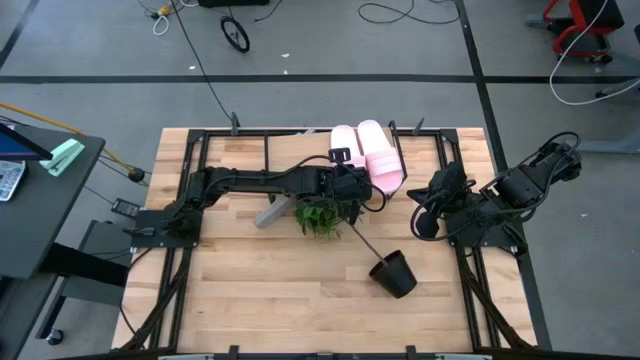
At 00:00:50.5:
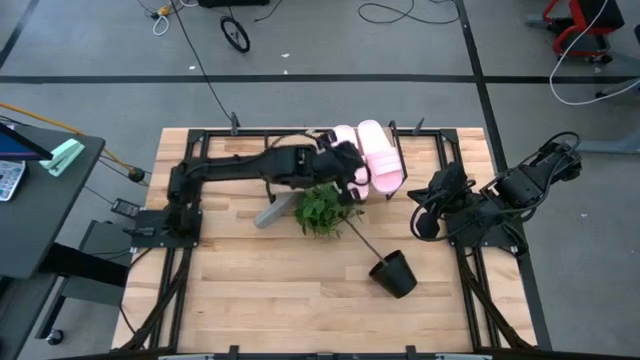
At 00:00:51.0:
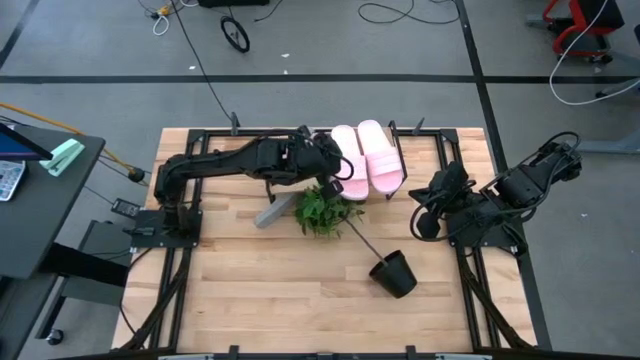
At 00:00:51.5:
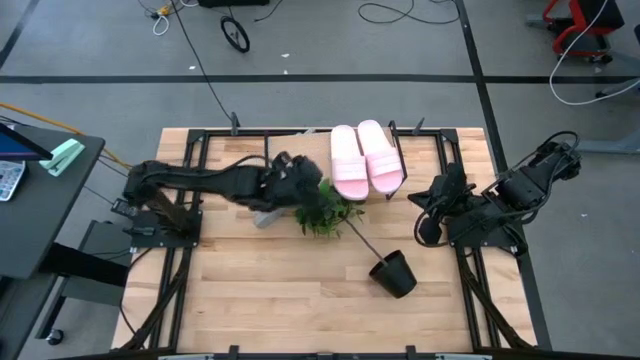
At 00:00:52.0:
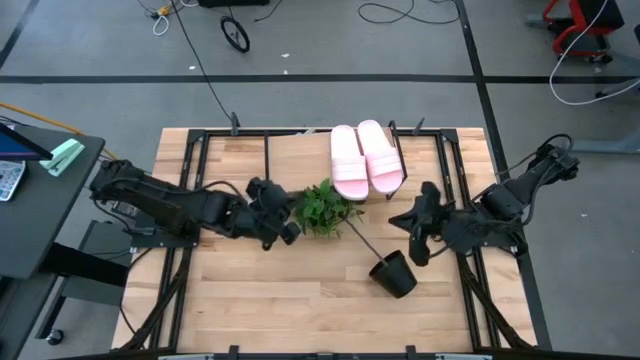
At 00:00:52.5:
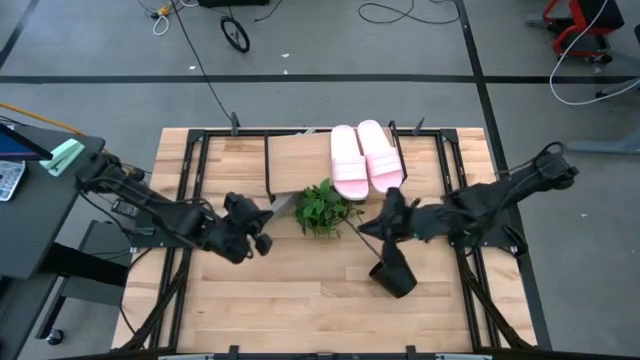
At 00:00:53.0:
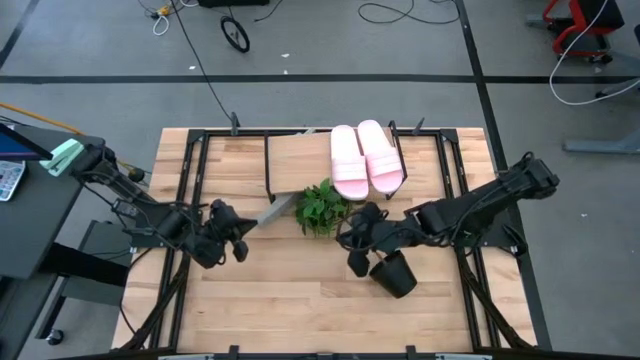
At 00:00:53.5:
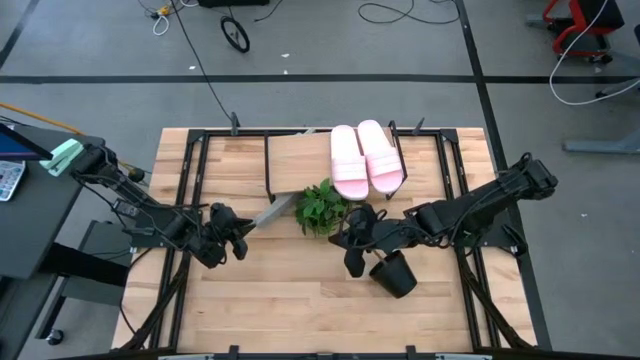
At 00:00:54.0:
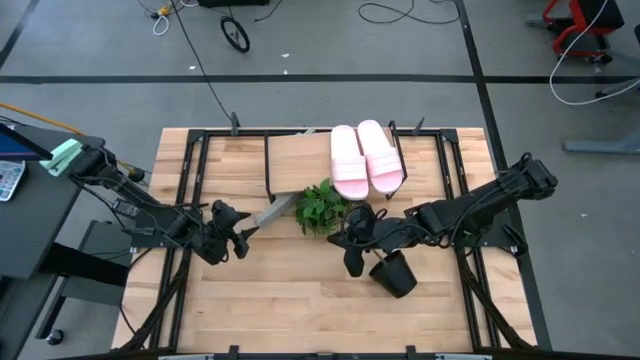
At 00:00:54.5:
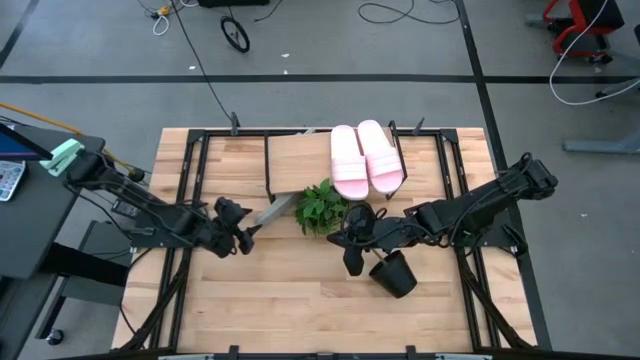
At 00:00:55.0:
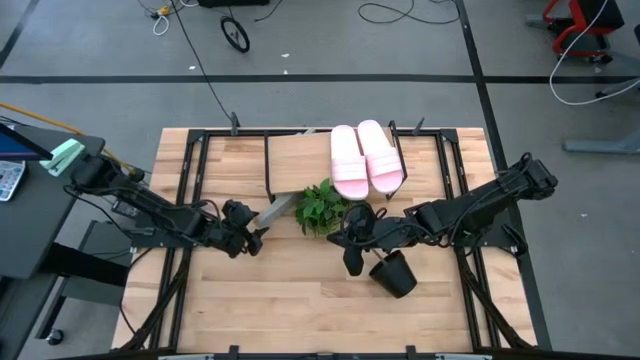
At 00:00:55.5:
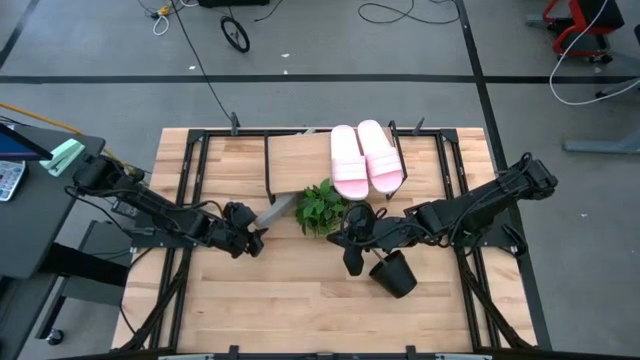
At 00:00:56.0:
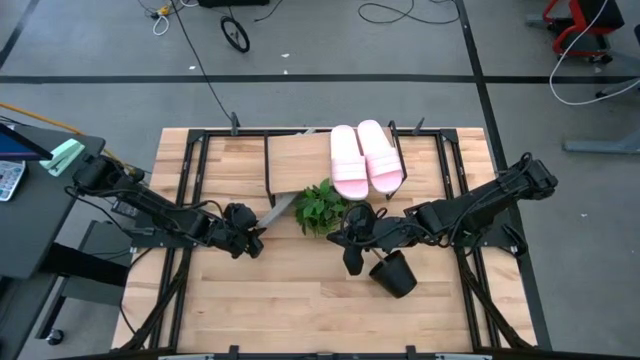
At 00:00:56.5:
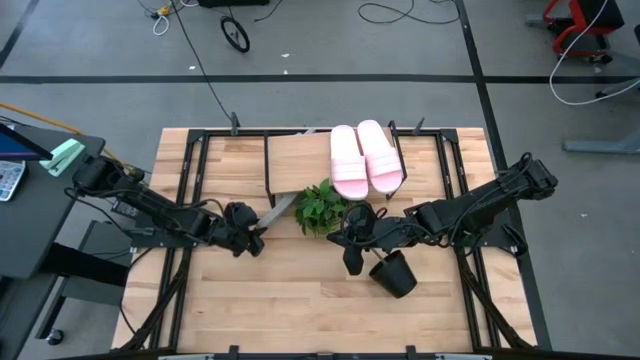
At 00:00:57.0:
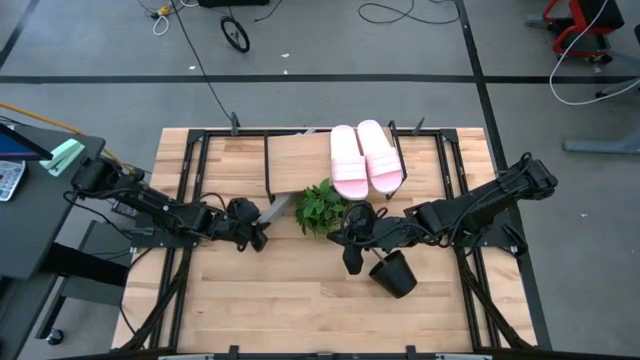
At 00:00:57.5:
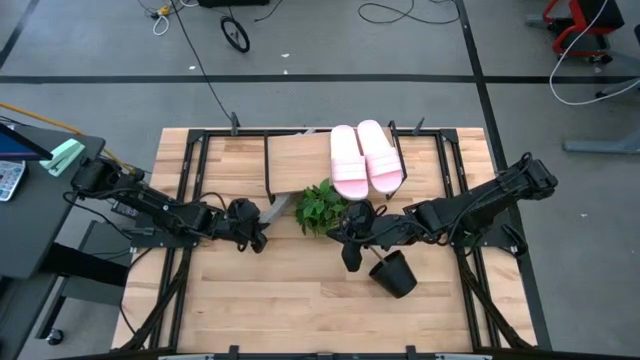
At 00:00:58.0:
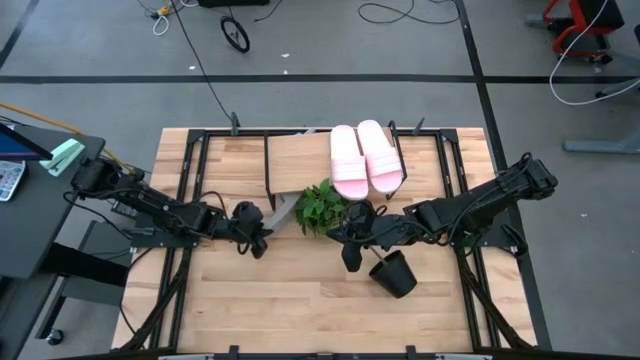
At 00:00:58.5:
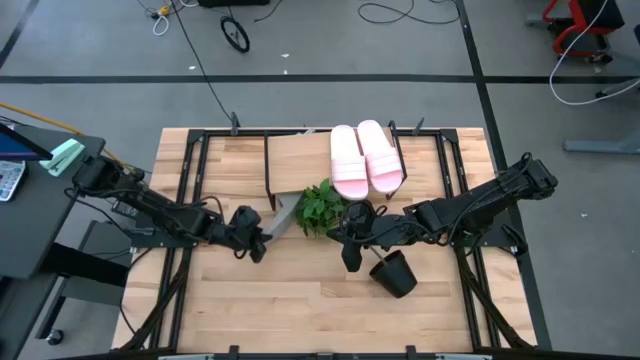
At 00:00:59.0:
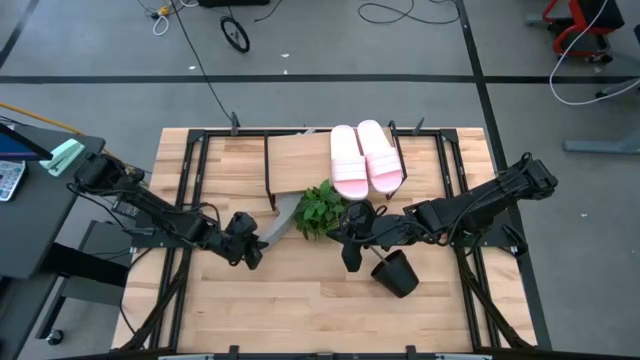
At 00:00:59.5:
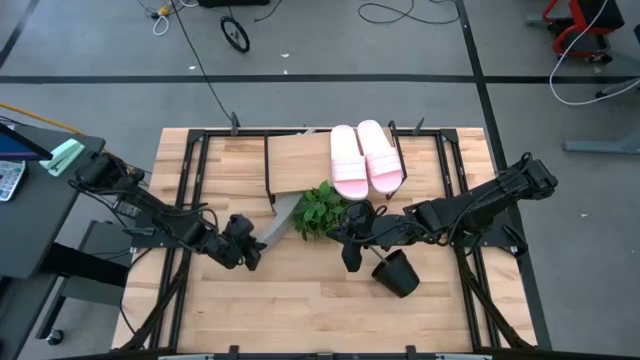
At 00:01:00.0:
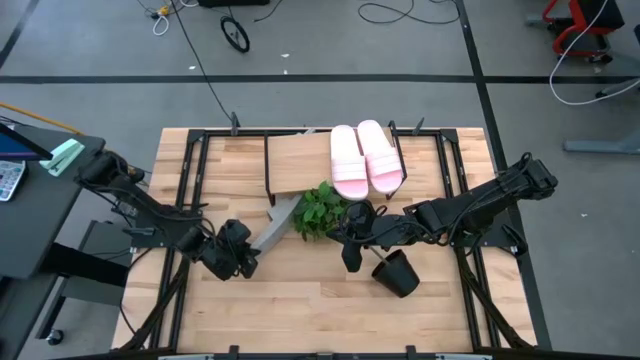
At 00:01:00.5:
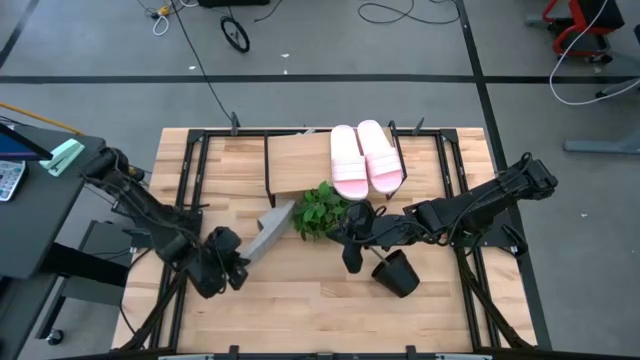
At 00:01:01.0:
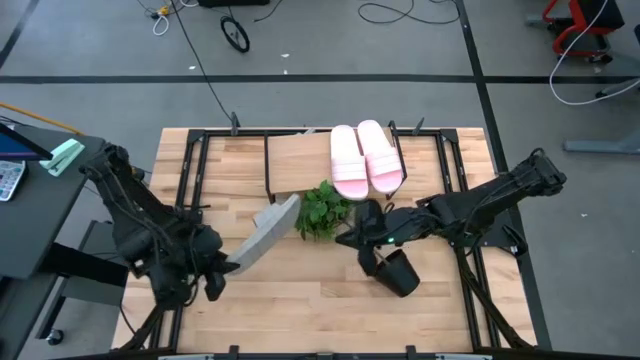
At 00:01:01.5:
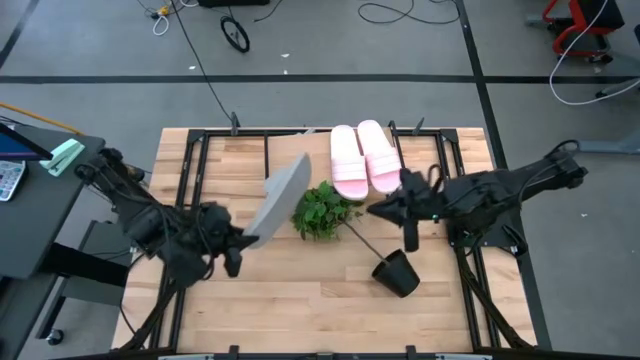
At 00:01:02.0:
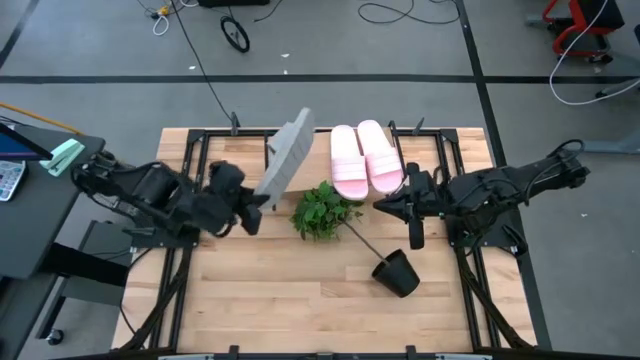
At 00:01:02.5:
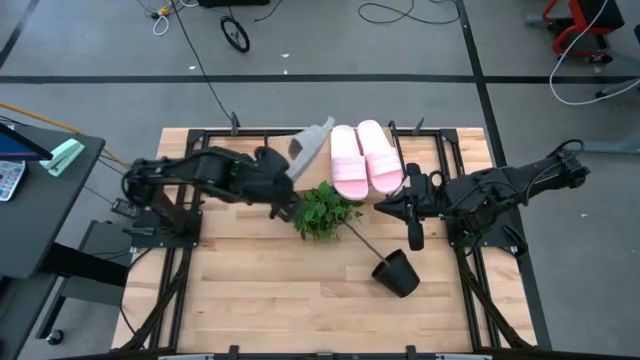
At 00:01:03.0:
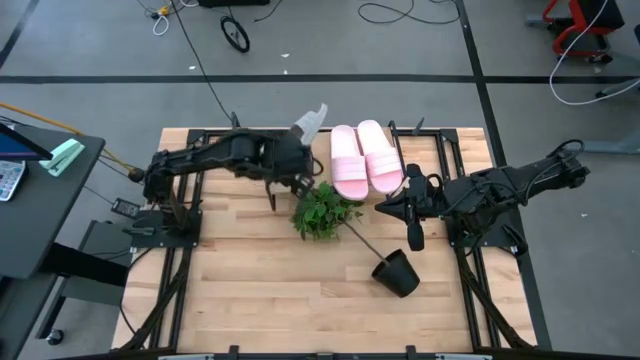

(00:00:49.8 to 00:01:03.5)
Task: Pick and place slides into the shelf
Put the bottom gray slides on the shelf

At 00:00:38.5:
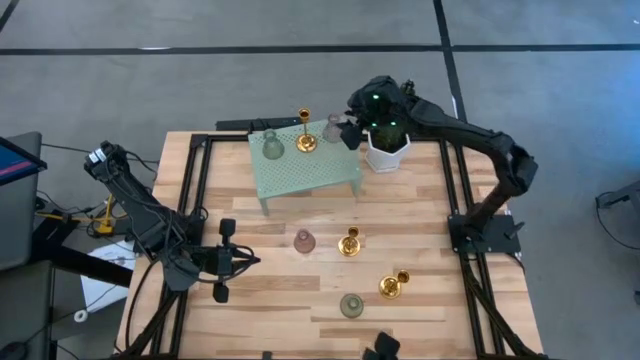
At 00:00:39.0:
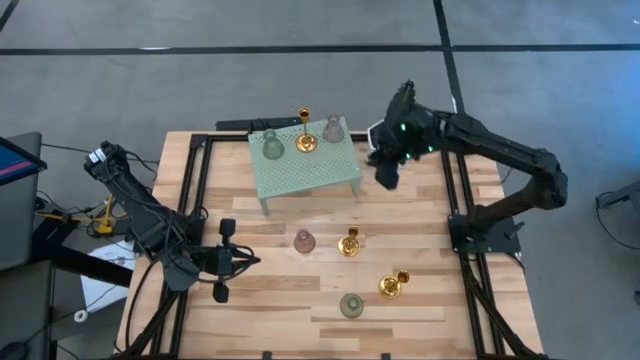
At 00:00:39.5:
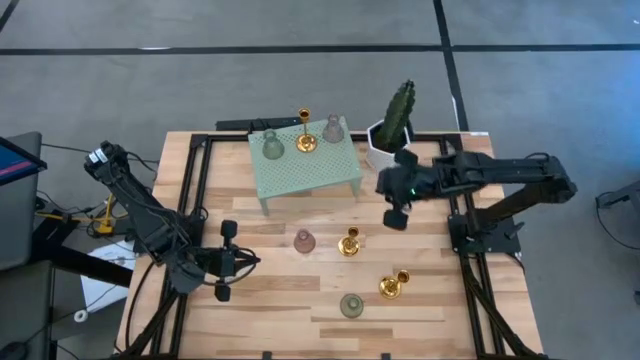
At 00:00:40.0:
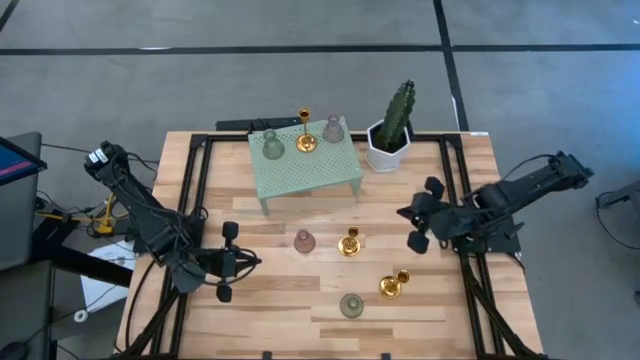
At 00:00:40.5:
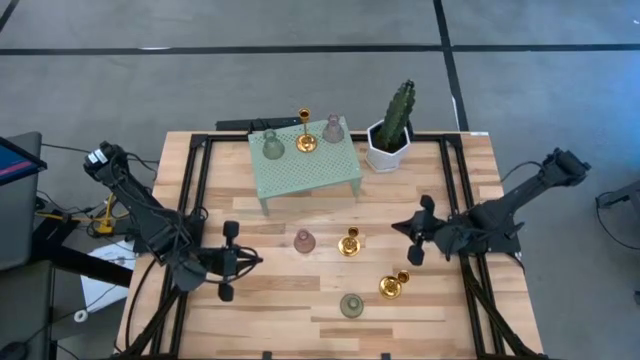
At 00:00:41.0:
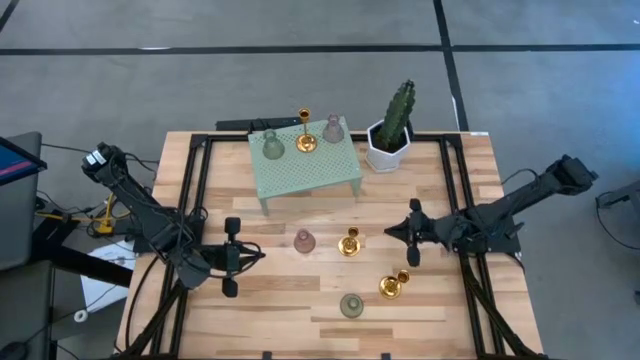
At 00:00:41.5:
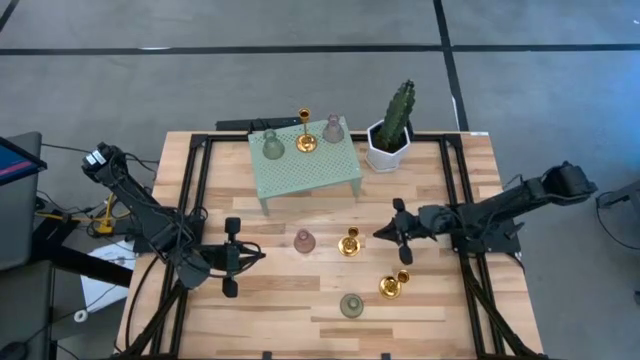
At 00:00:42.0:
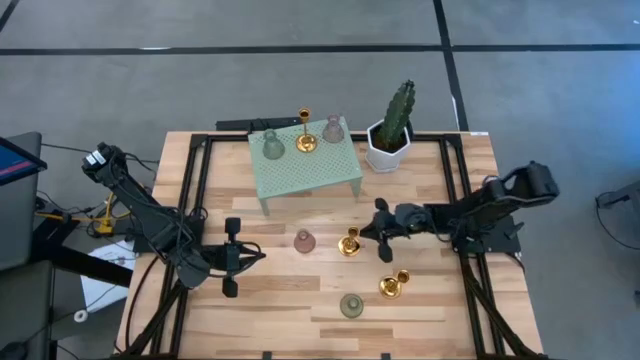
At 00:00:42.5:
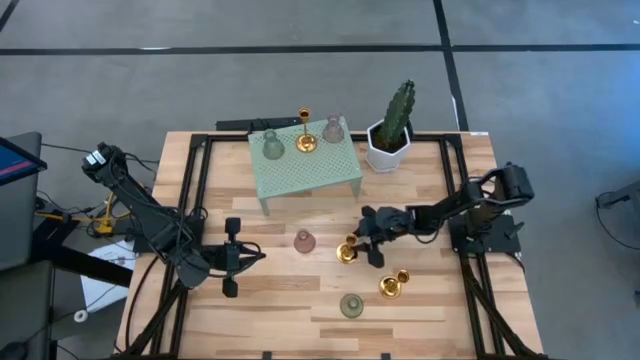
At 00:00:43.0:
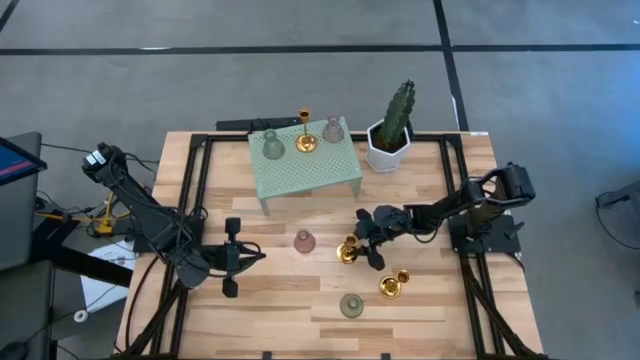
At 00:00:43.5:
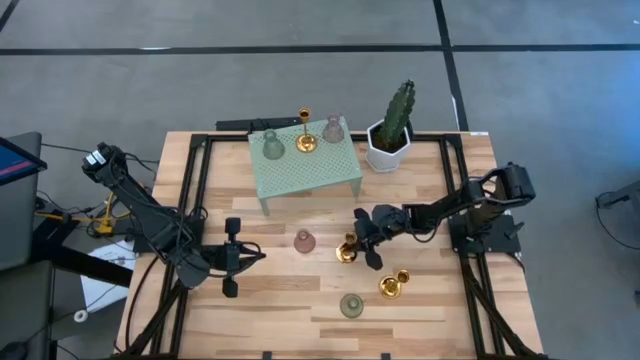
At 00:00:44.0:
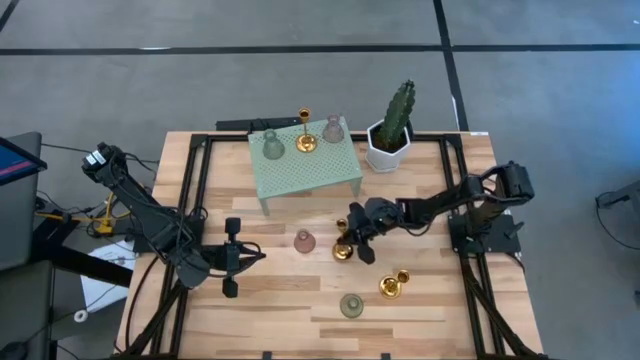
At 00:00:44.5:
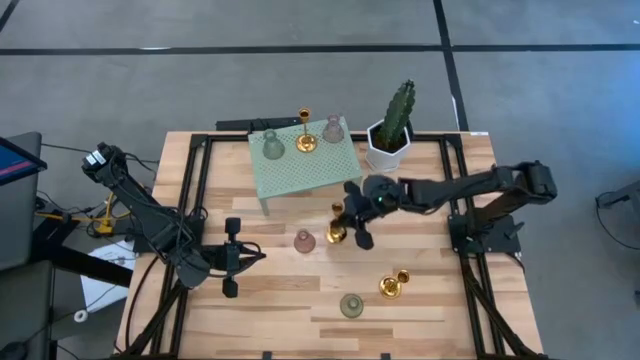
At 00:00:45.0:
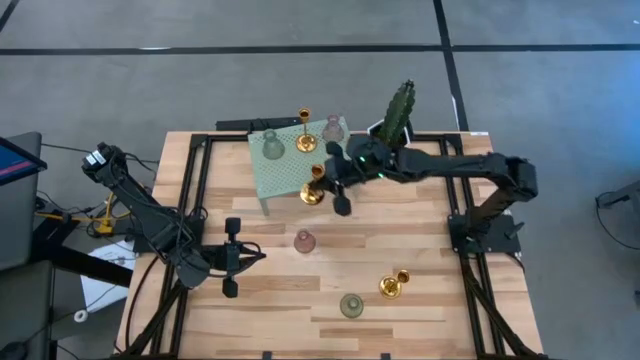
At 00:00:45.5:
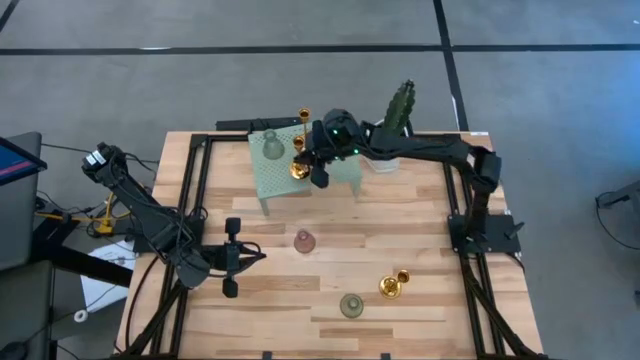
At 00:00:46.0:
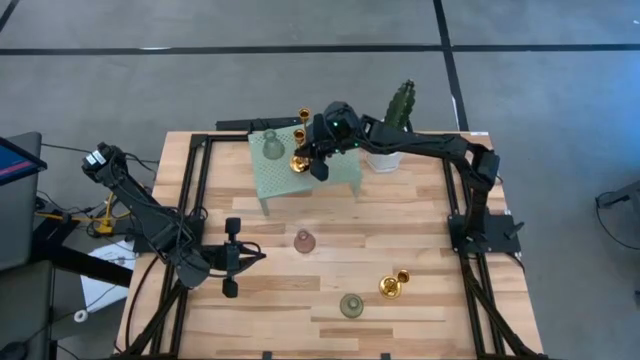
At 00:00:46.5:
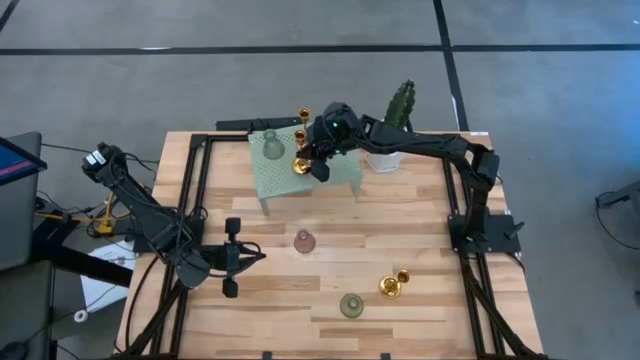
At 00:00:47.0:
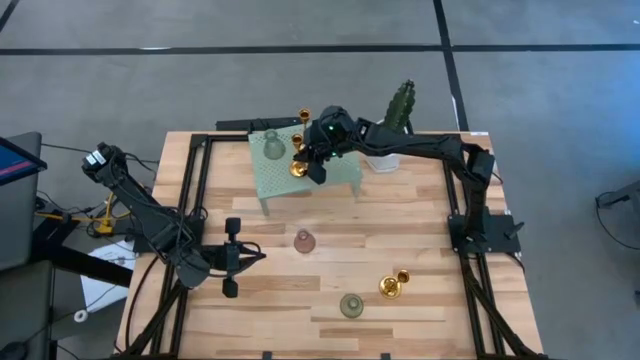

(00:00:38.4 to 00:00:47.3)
Task: Pick & Place candle stick holders
Put the top golden candle holder on the shelf
